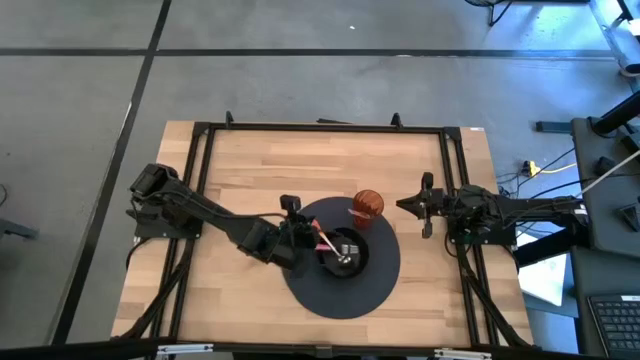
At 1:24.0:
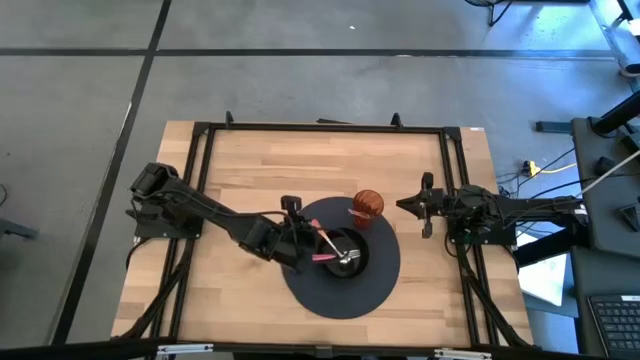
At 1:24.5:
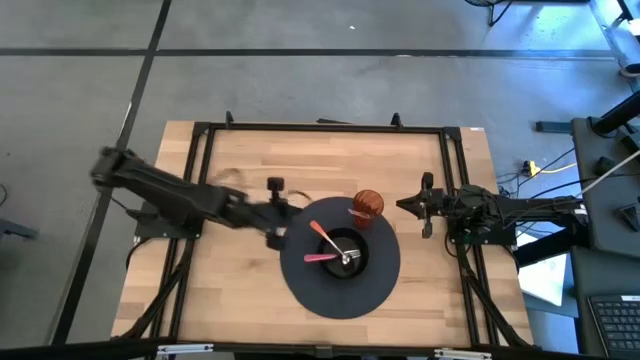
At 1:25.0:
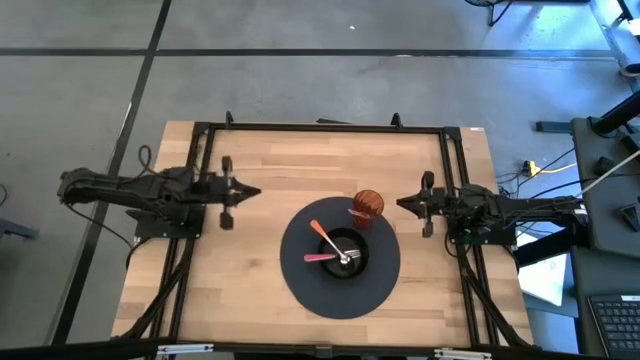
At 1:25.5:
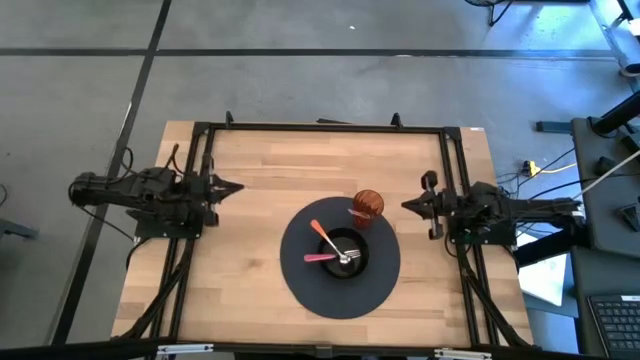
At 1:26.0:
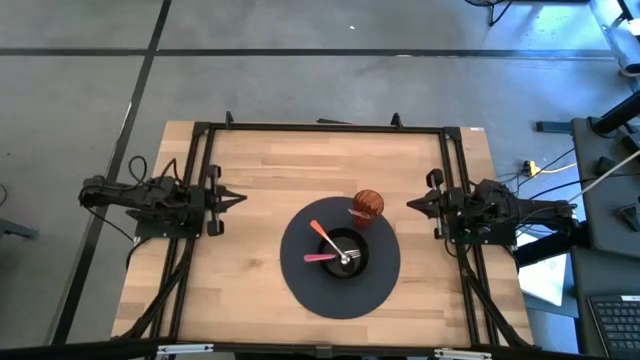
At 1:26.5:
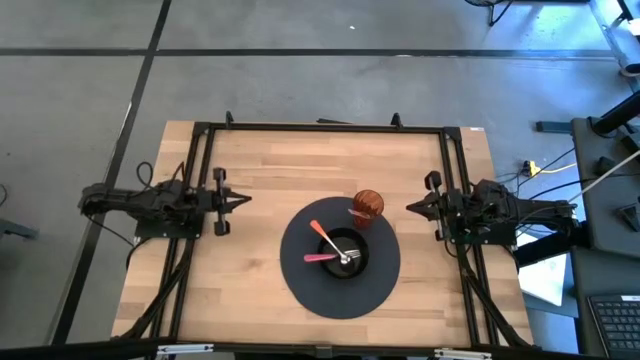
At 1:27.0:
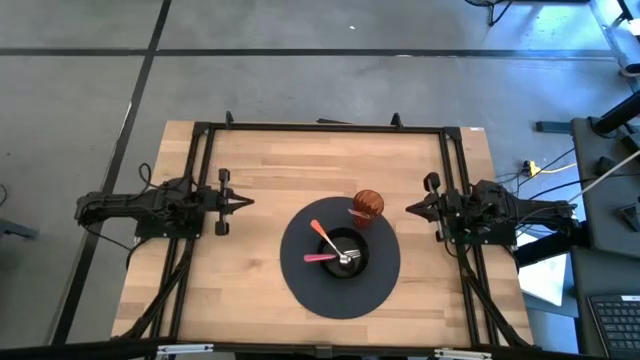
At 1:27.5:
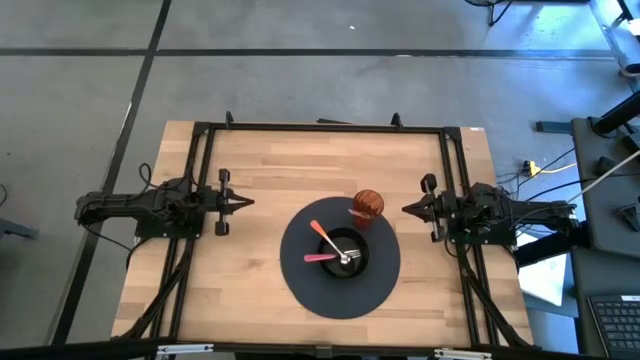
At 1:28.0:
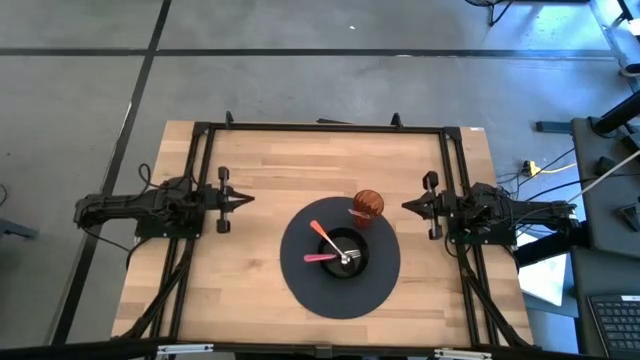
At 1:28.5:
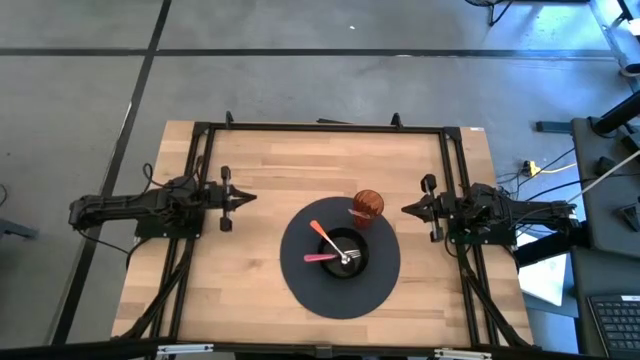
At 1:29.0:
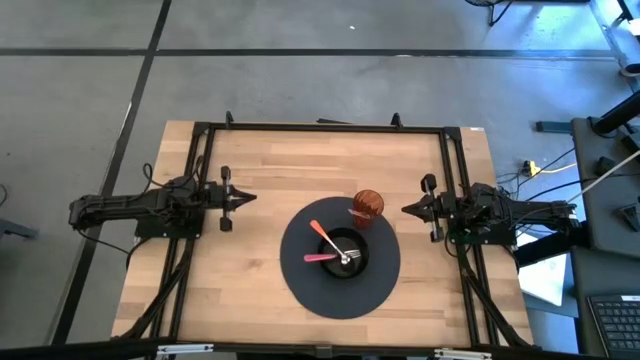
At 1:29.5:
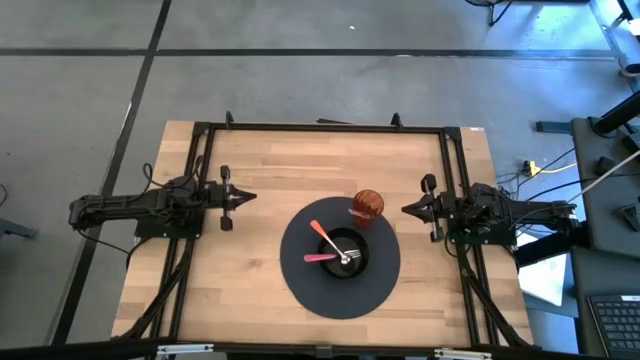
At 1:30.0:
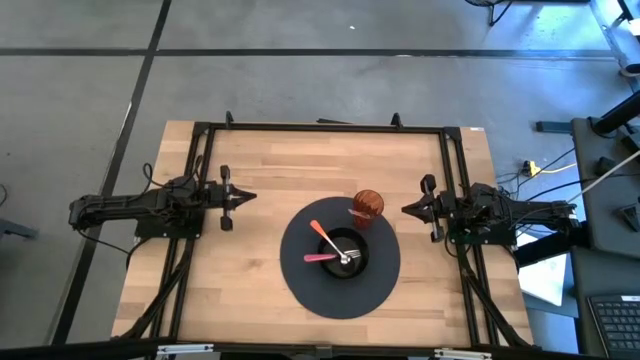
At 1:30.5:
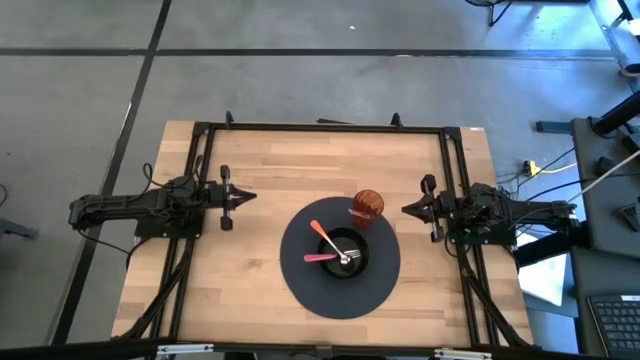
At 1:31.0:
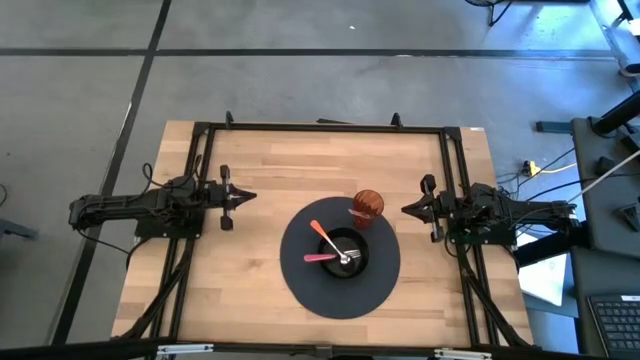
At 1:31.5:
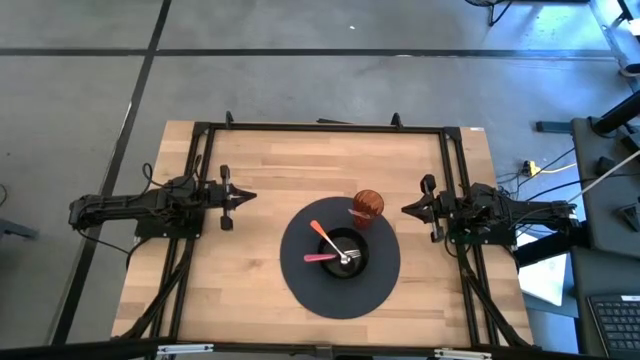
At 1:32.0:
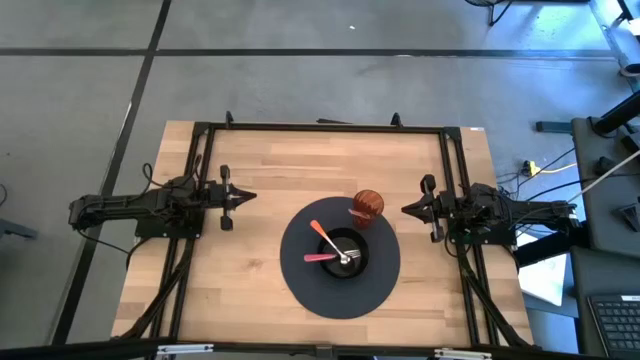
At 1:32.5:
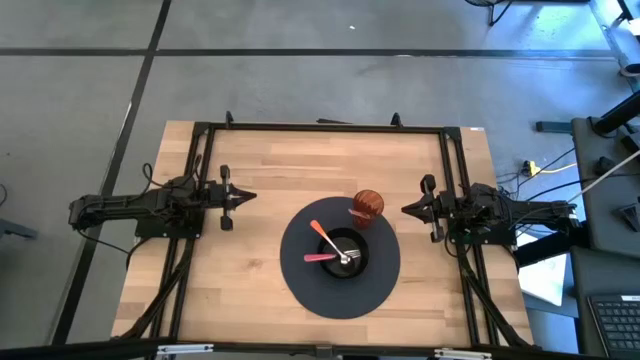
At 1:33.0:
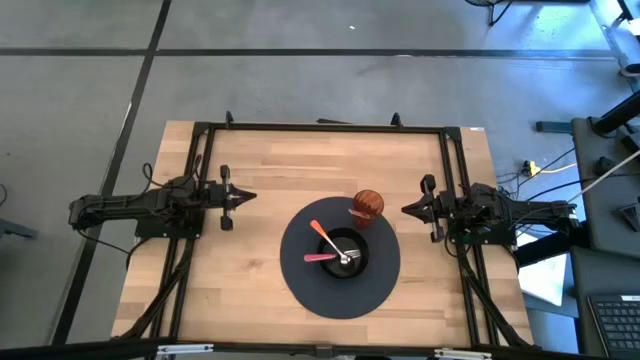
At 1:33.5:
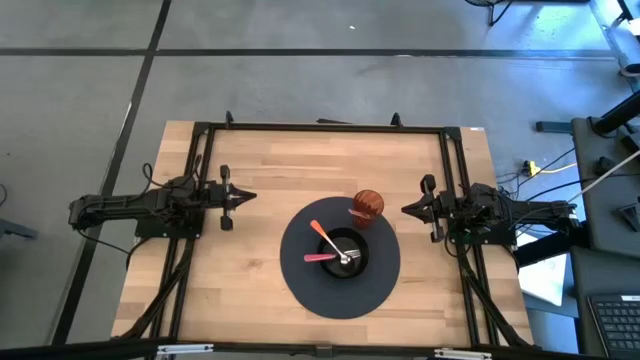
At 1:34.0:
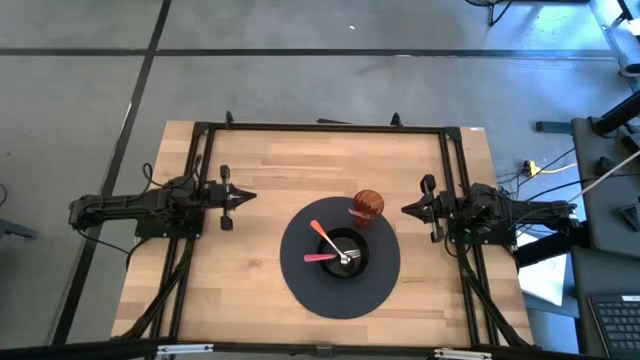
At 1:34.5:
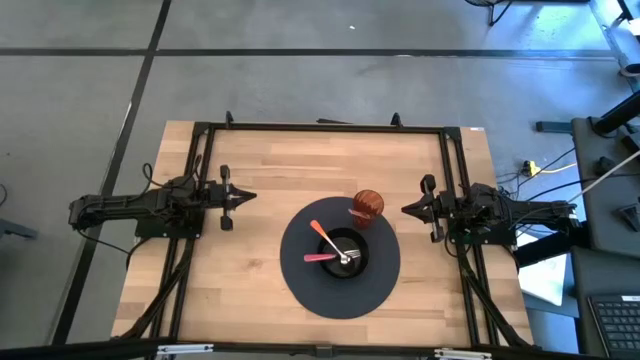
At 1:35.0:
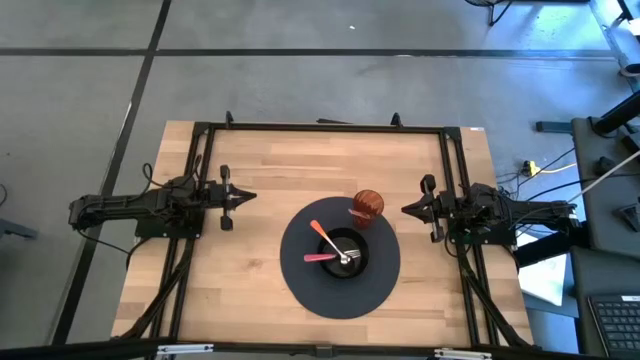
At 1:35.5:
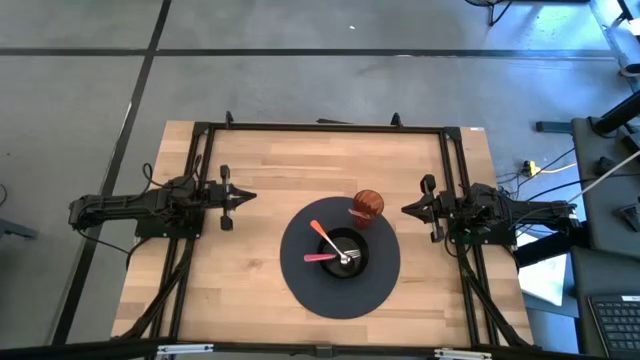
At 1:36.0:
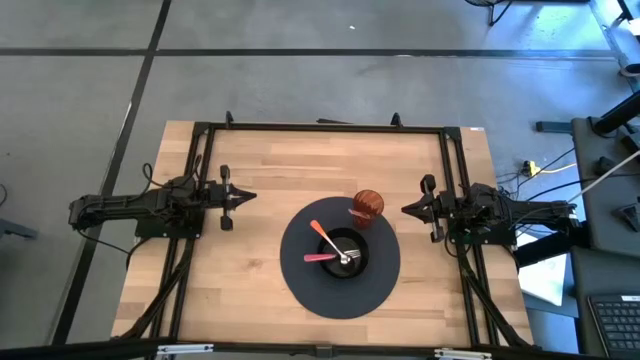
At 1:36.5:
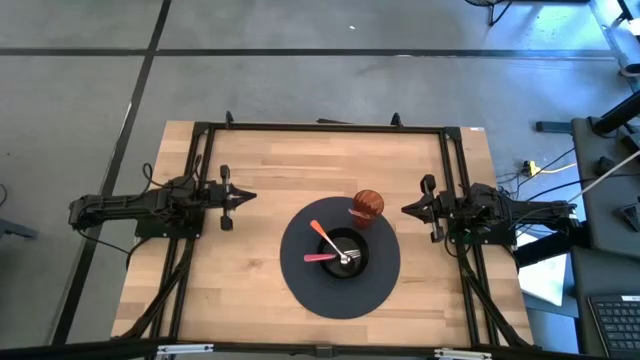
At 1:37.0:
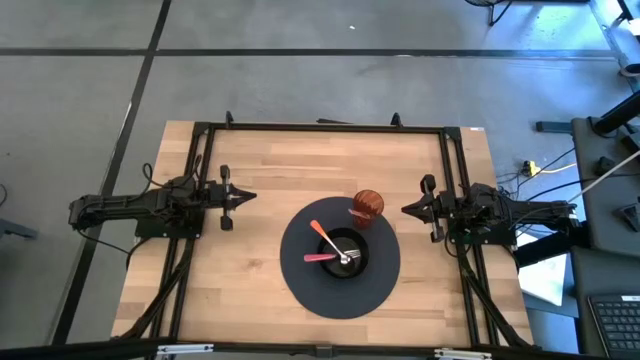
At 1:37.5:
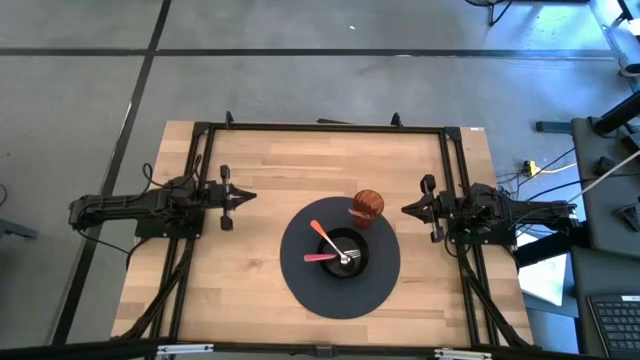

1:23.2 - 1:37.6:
Task: Pick & Place Utensil
Return to Home position

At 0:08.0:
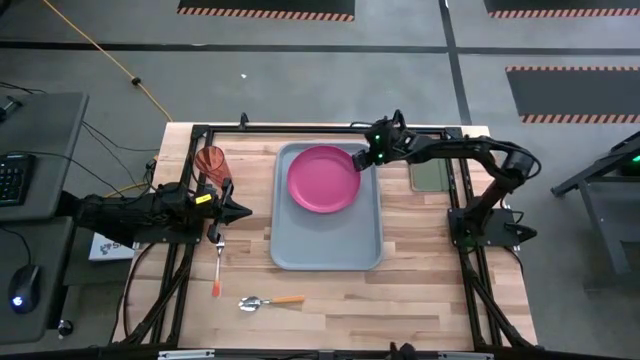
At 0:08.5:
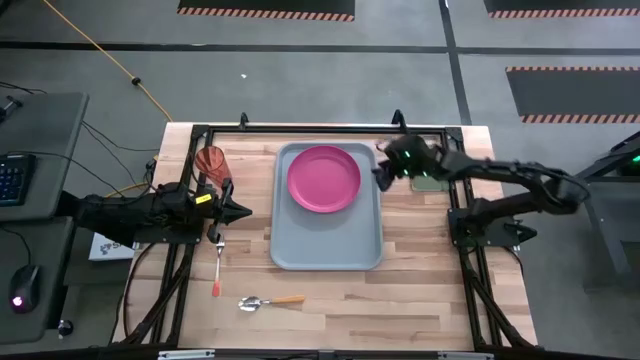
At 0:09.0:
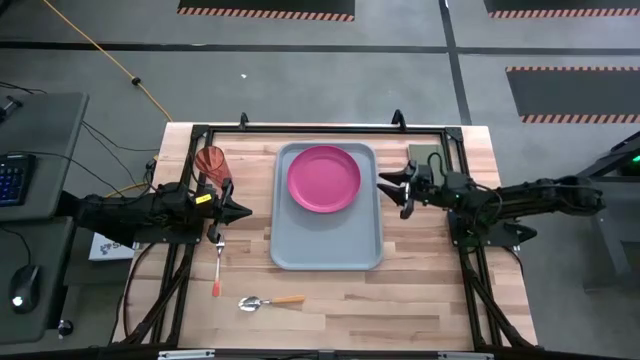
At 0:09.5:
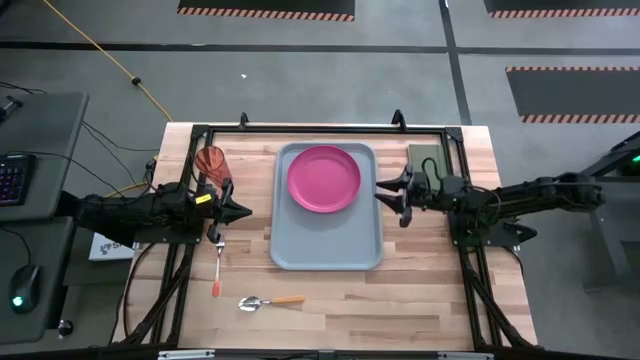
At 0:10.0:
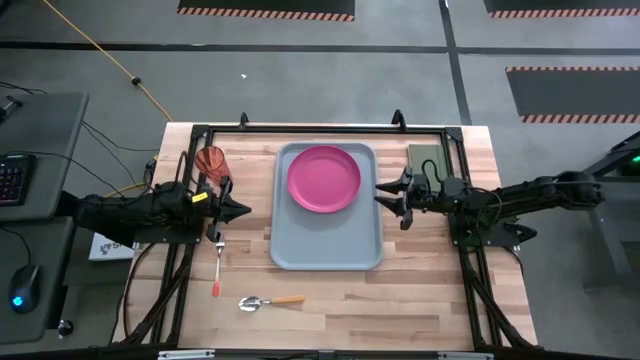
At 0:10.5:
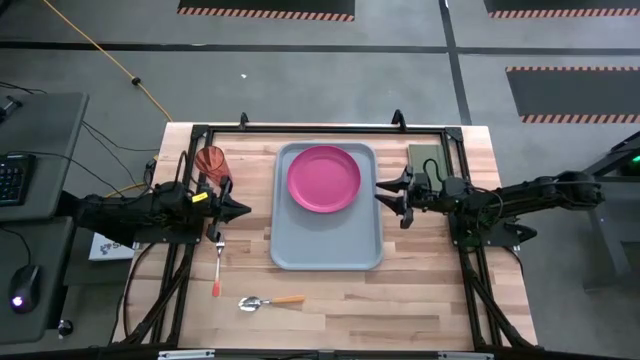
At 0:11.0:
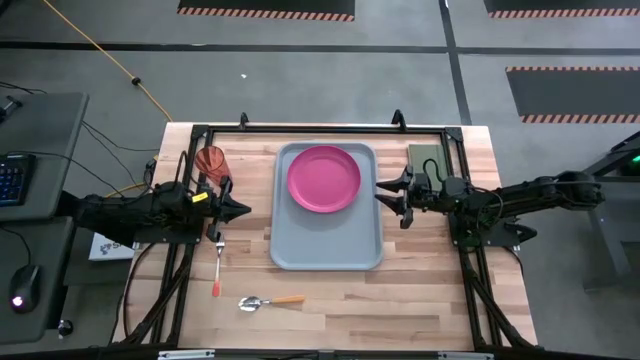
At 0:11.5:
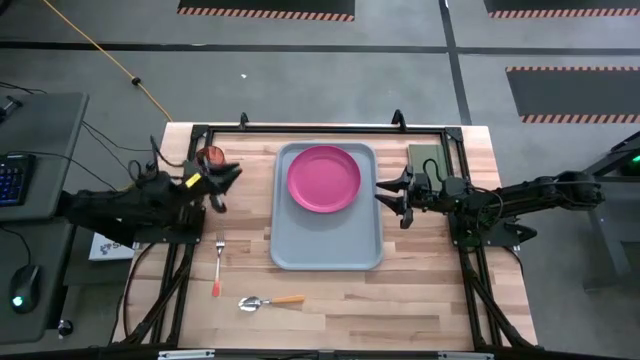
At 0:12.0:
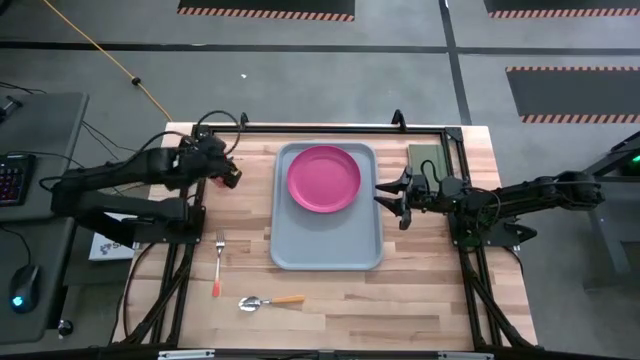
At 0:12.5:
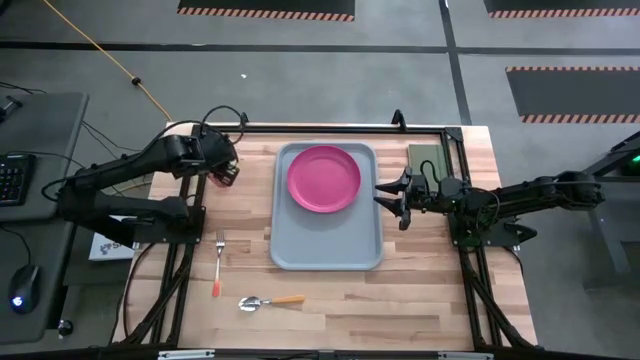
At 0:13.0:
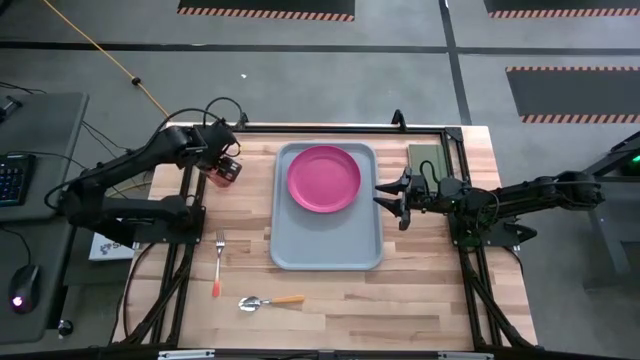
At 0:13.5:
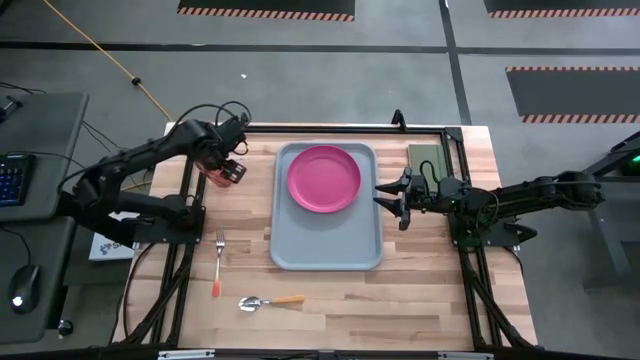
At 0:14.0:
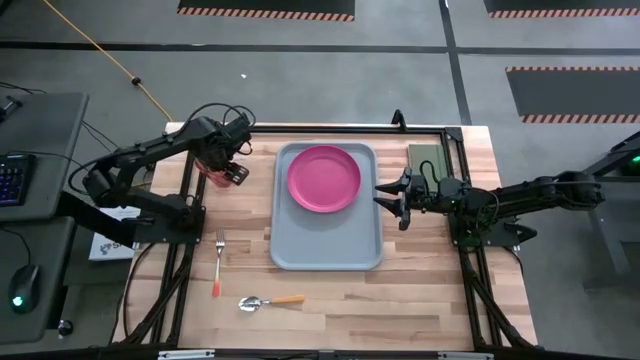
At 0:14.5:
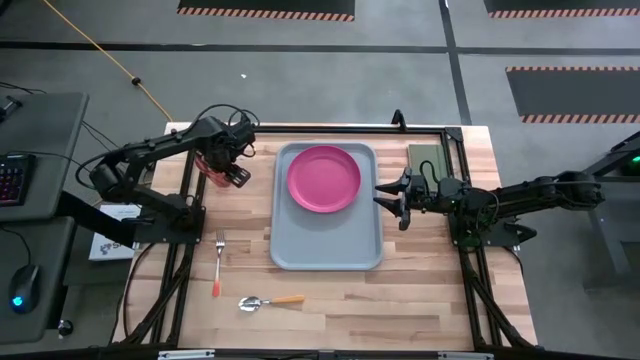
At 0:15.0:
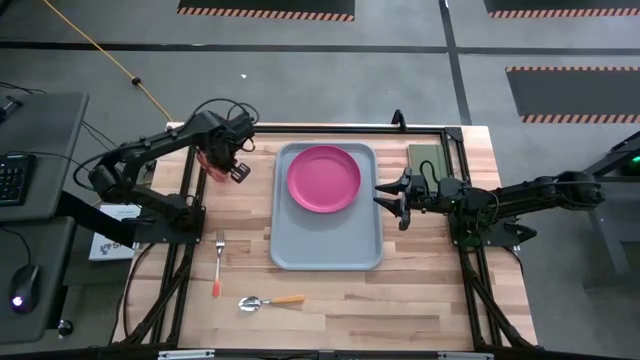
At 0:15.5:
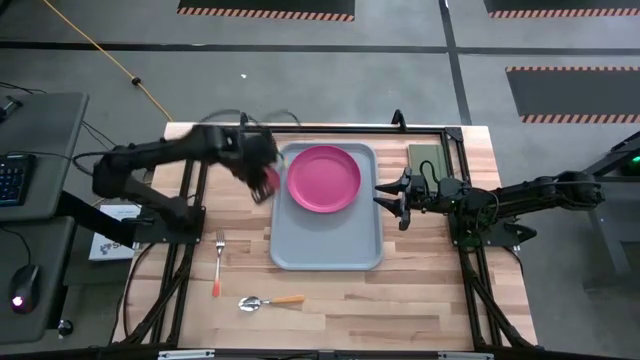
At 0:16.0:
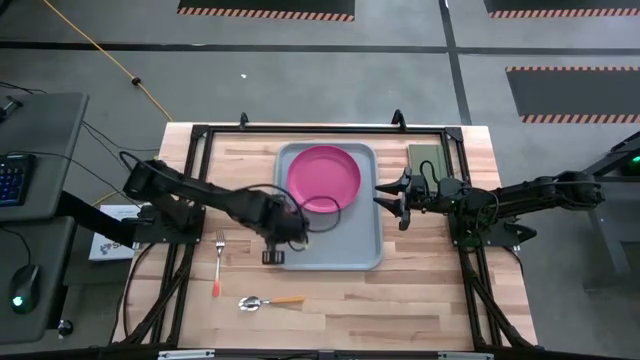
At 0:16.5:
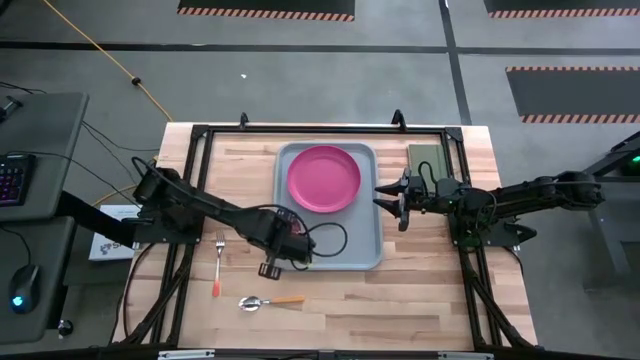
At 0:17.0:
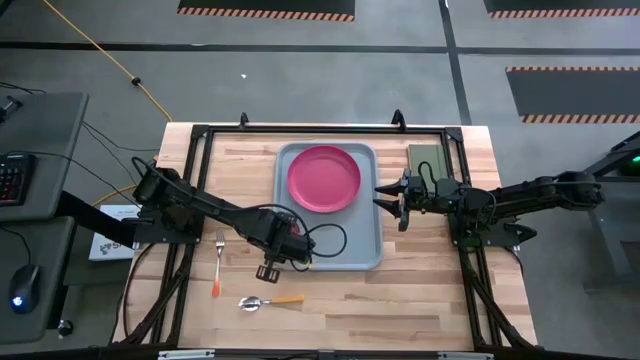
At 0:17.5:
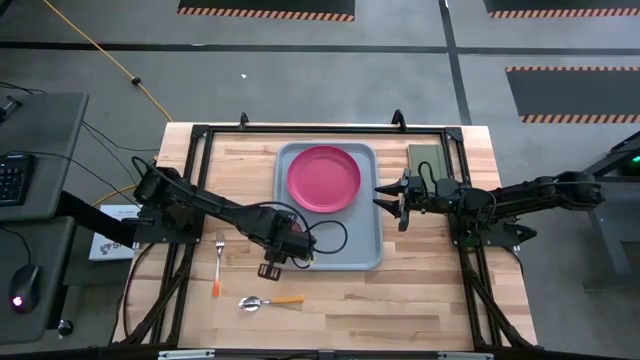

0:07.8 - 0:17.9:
Task: Pick and place plate/cup/fork/spoon on tray
Put the orange cup on the gray serving tray to the bottom left of the pink plate
